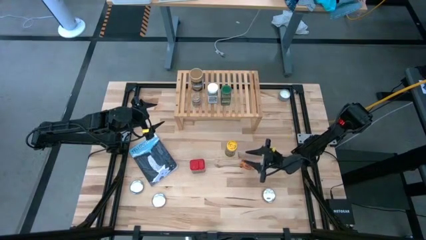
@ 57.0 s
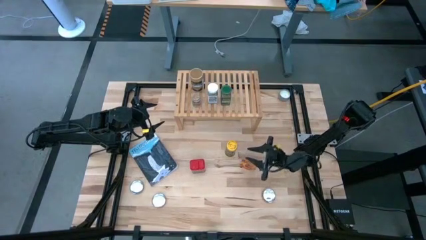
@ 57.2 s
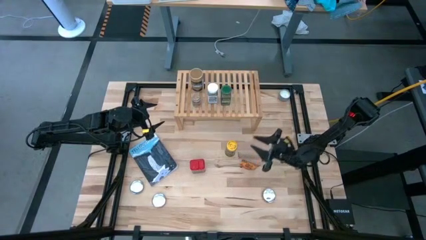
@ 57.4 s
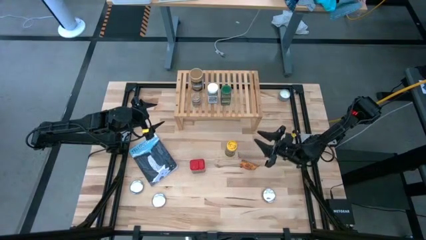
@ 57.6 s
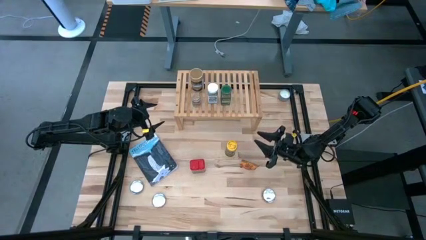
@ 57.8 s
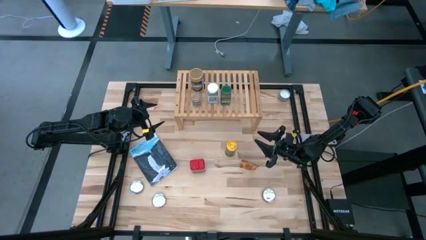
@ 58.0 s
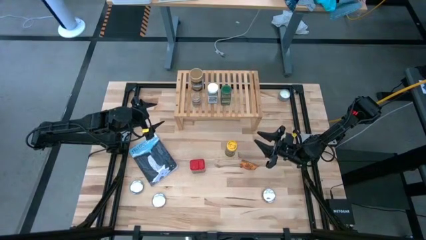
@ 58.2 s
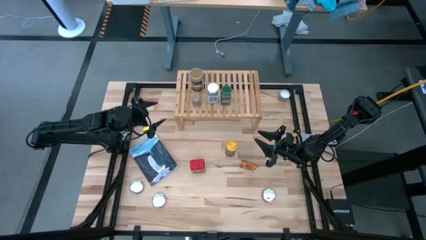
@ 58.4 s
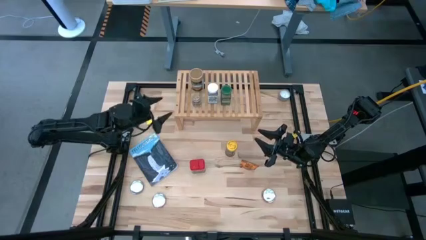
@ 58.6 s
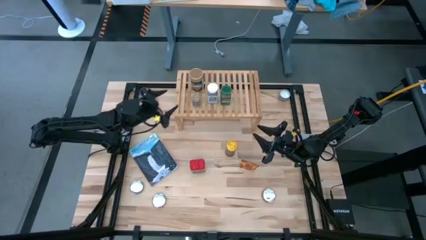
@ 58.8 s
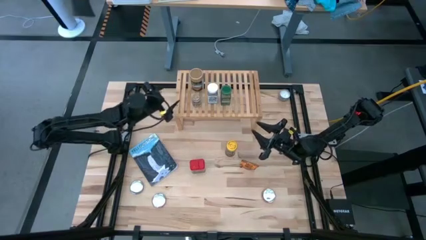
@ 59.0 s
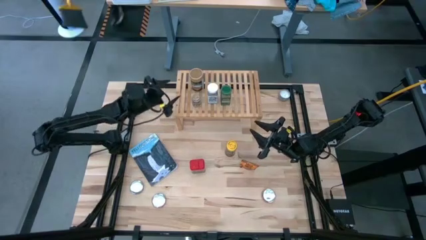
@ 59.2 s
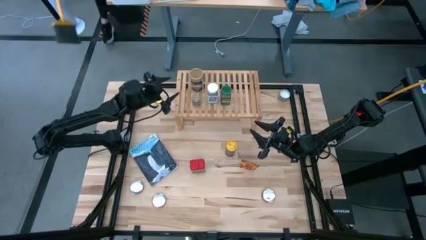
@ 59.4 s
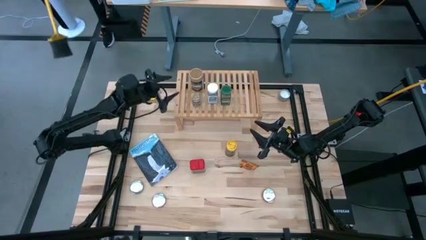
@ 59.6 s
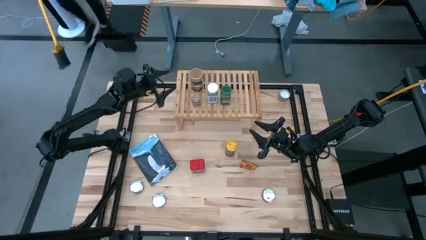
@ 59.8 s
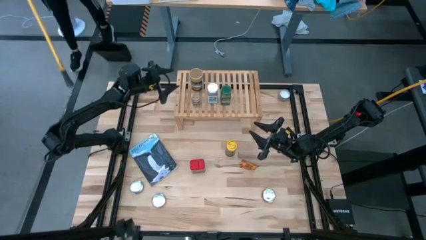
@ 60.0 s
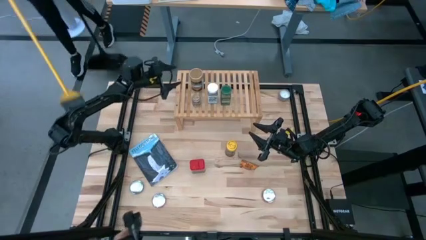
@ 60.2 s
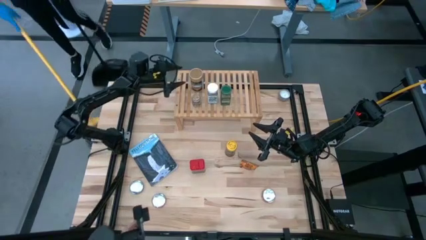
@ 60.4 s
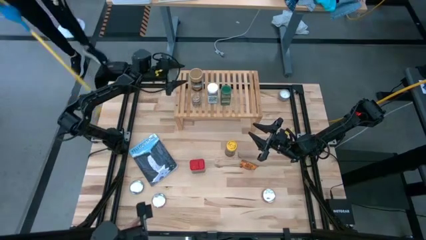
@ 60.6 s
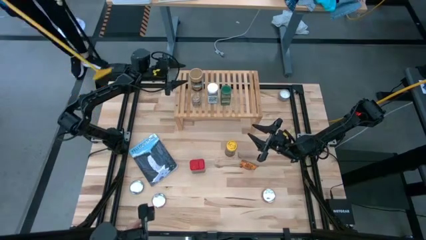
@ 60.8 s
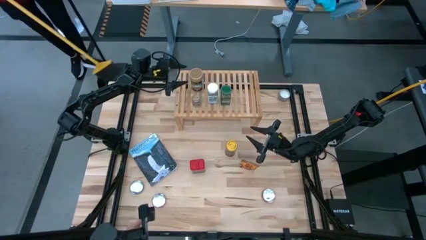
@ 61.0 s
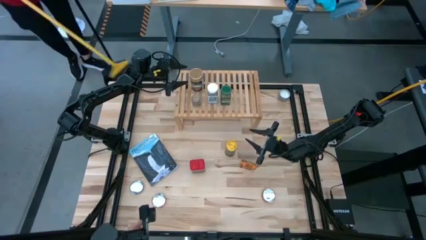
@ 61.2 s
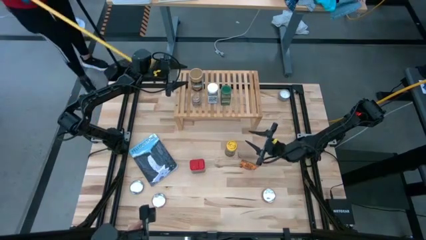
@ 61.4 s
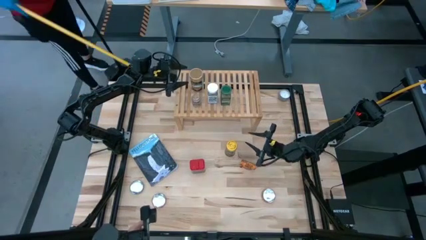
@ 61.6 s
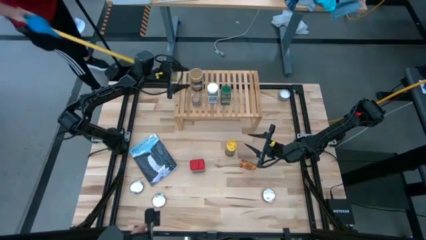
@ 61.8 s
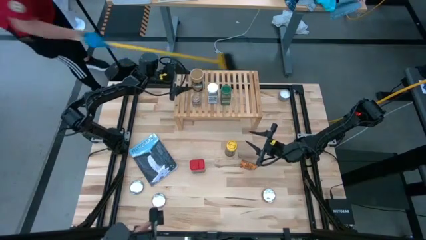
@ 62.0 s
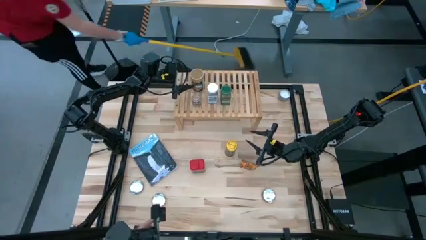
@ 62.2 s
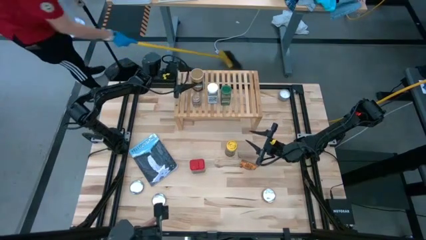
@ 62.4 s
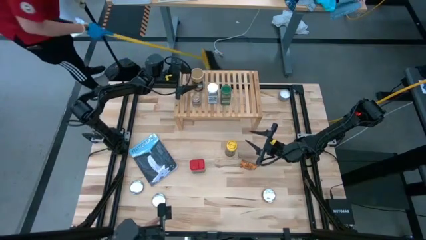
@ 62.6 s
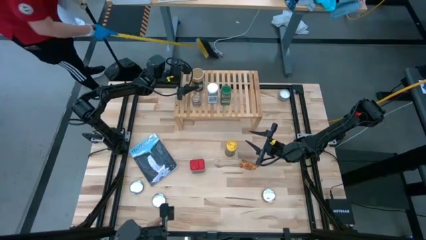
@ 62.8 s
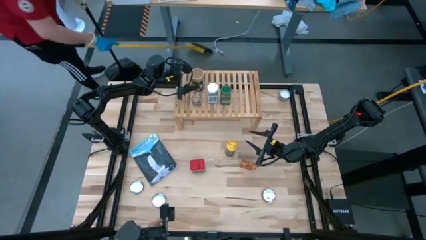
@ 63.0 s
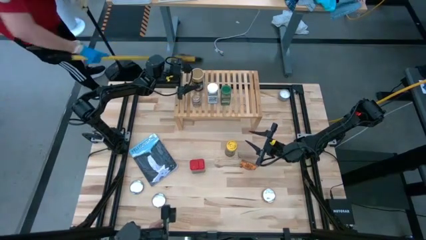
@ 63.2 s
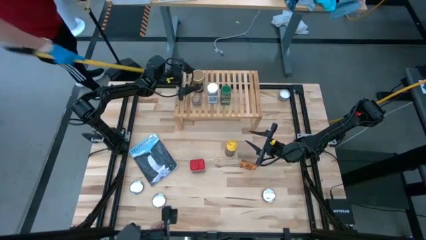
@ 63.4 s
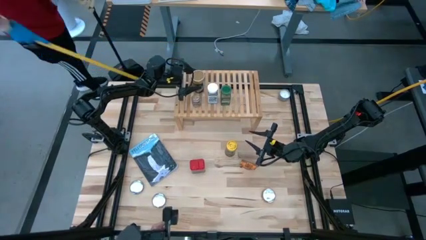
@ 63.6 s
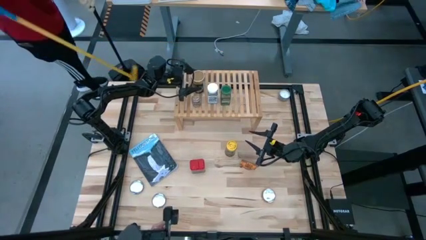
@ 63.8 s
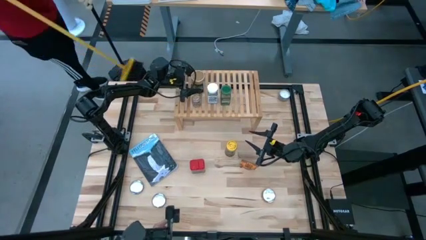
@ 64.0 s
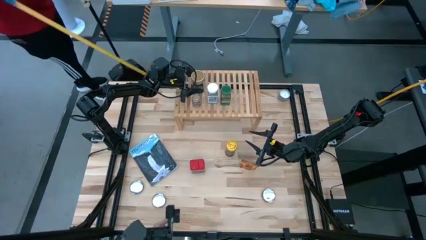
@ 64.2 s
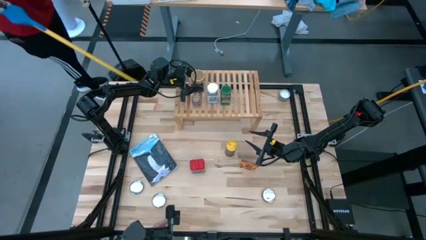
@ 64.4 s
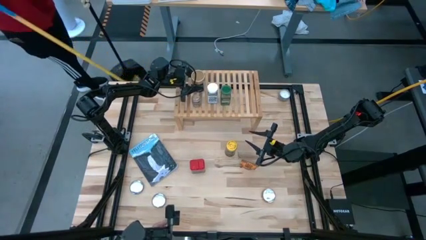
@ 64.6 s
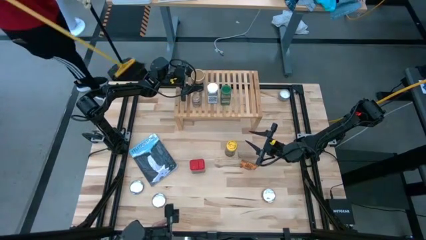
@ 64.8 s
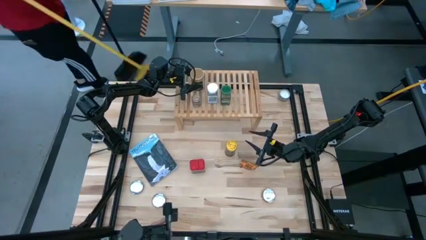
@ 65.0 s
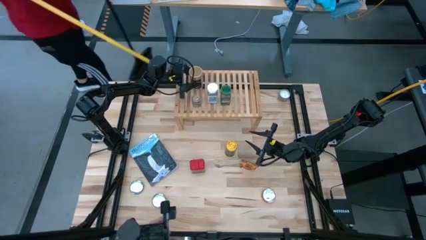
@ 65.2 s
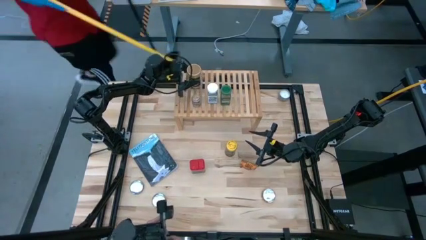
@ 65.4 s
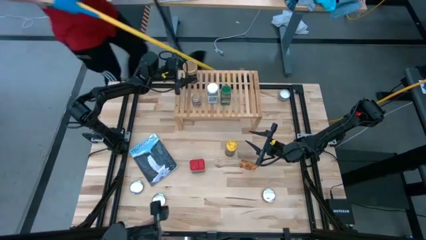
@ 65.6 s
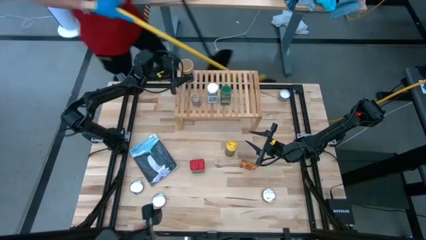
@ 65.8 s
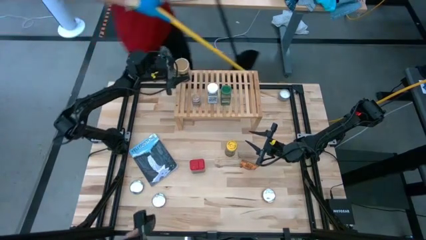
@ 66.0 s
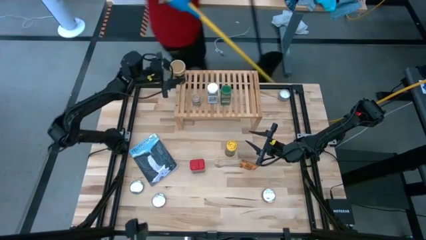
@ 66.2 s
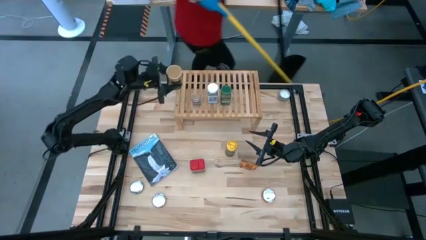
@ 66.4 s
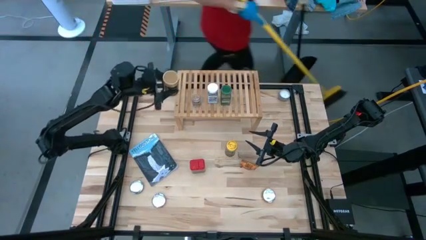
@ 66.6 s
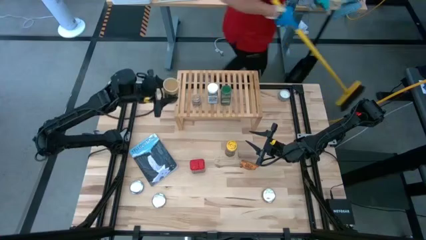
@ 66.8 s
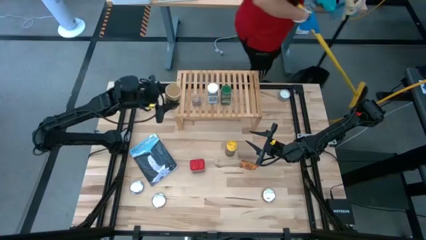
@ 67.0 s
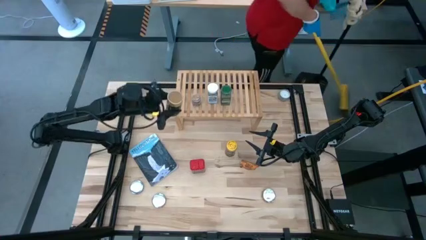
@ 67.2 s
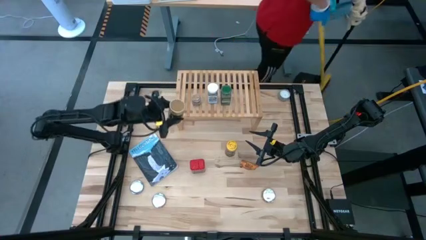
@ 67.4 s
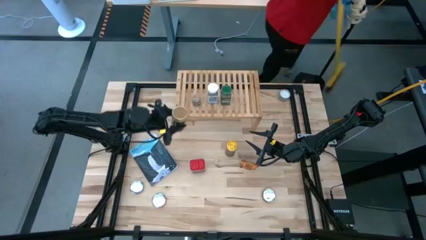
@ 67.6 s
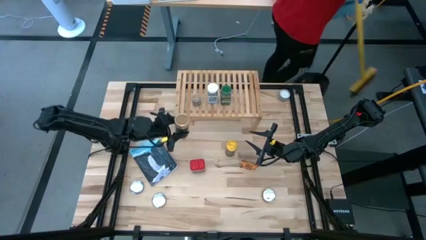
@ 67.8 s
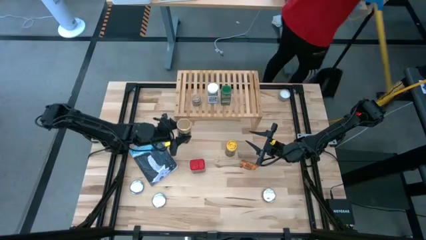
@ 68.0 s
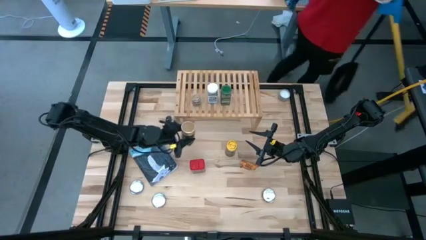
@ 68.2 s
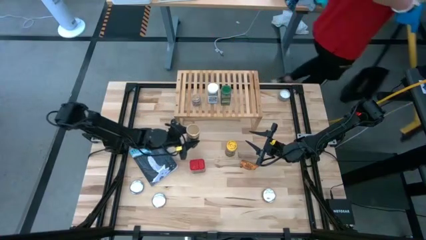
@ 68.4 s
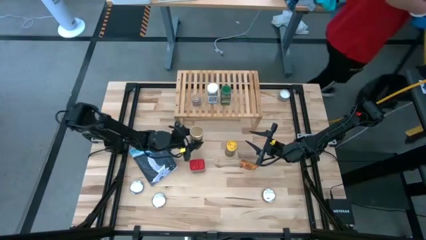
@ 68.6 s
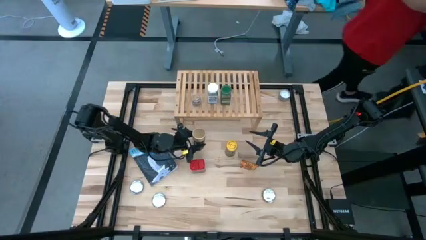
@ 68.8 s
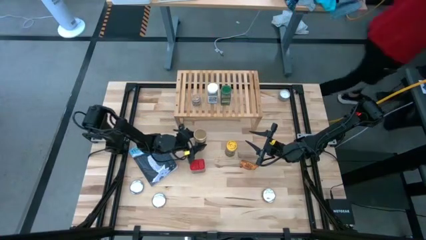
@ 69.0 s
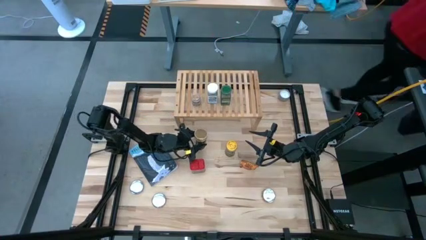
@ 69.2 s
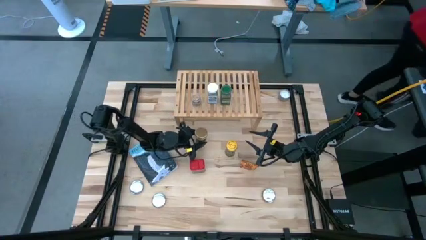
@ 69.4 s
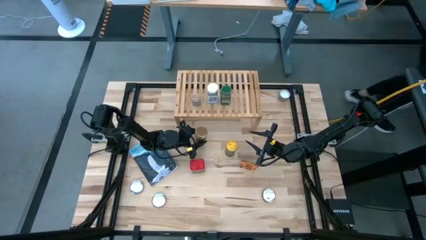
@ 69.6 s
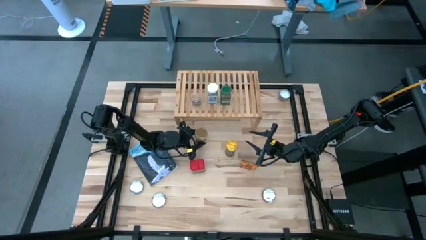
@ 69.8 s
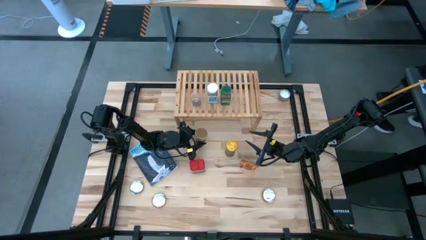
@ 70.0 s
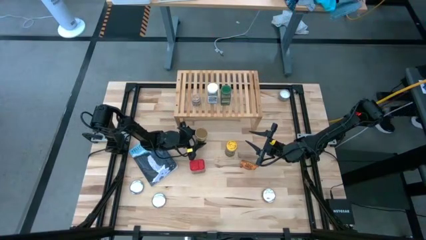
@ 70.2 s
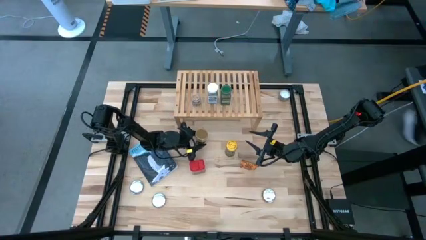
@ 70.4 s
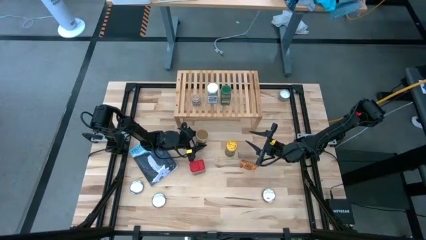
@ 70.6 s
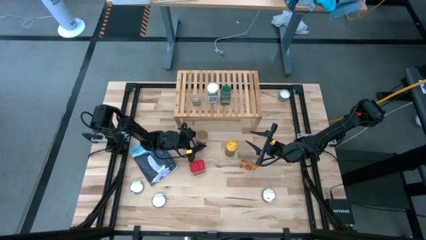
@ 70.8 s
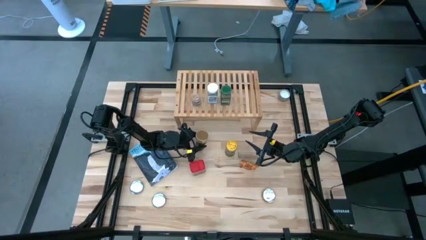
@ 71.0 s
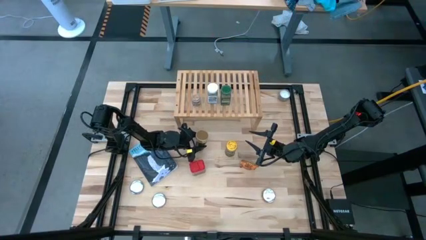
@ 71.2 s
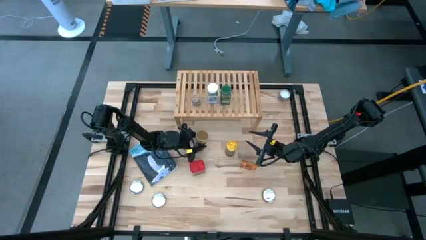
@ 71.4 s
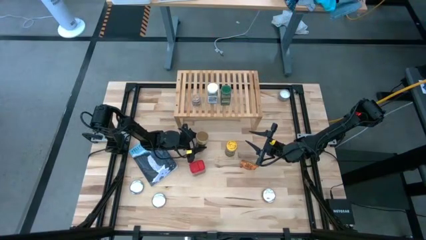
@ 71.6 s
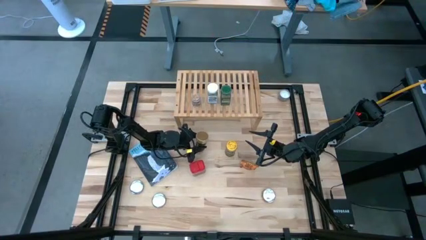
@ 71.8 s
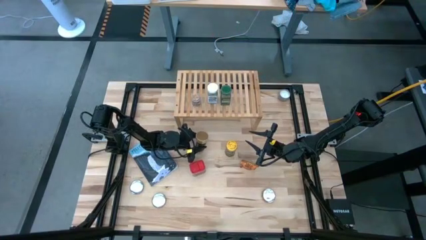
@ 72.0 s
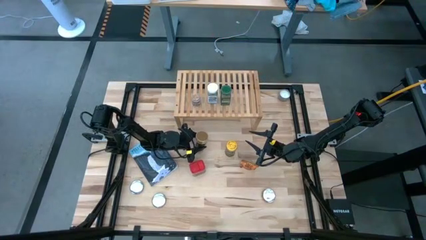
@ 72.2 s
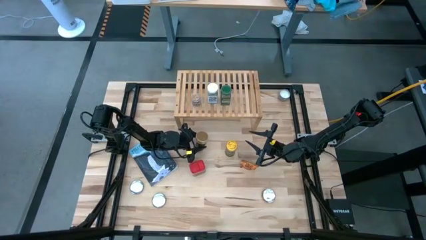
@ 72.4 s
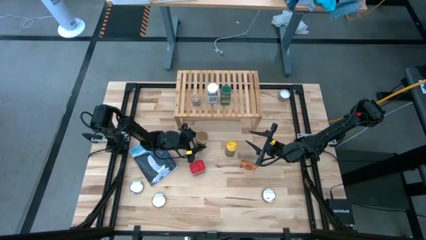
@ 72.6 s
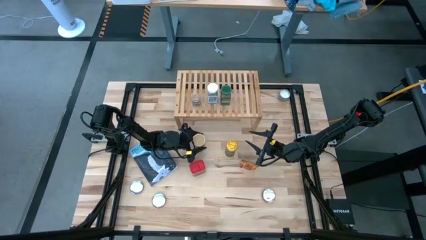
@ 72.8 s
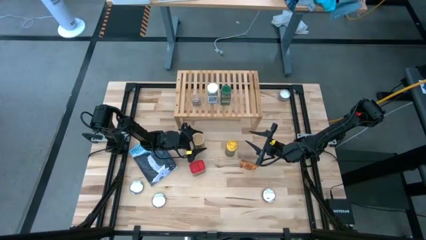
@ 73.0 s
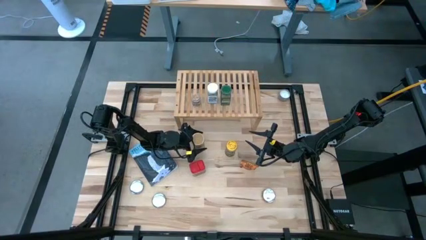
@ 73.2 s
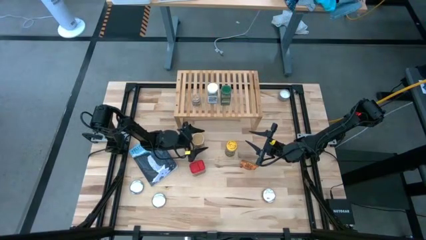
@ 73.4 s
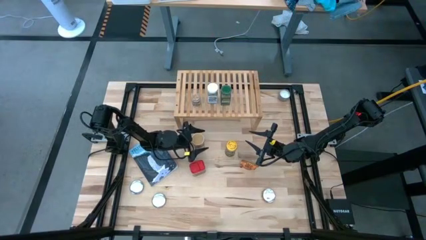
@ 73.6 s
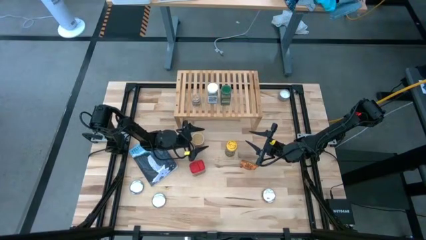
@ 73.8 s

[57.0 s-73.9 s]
Task: Shelf spices
Remove the brown seasoning bottle from the shelf
